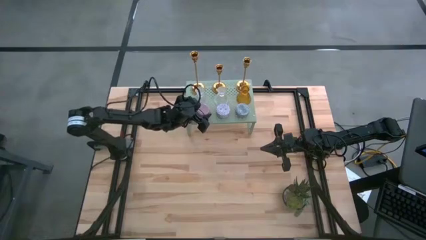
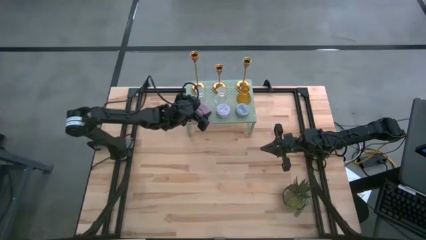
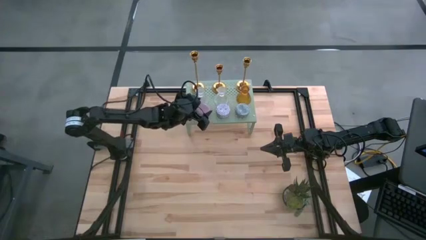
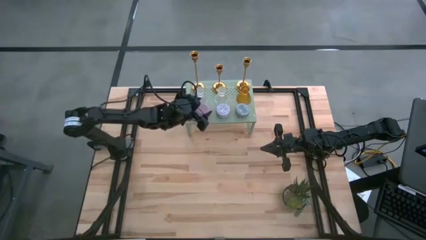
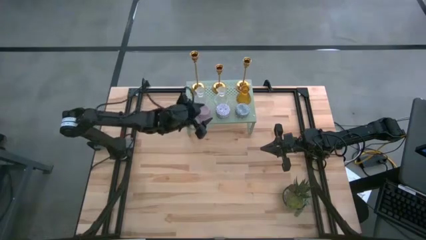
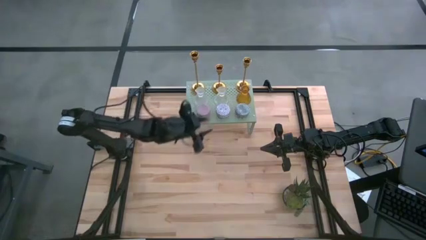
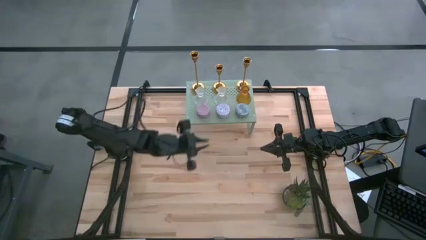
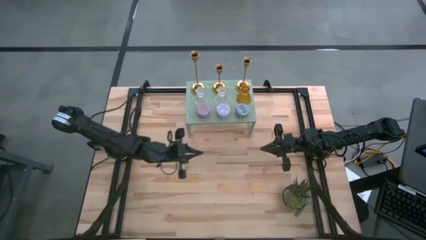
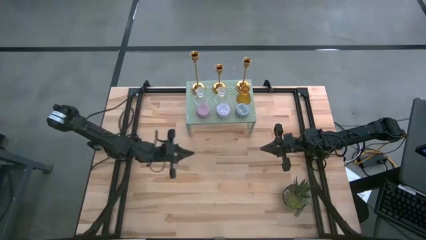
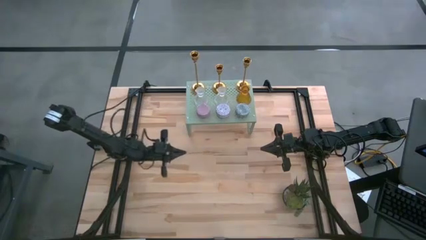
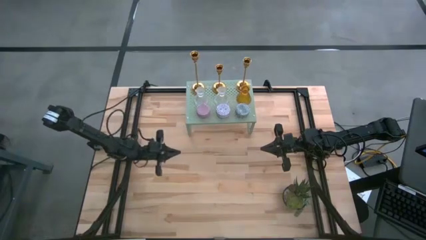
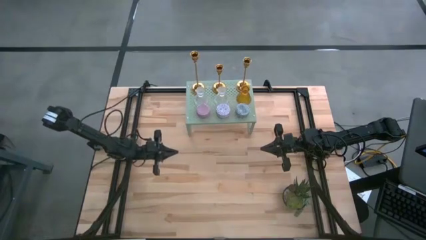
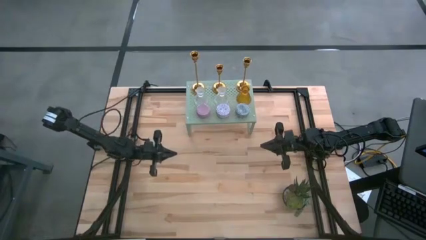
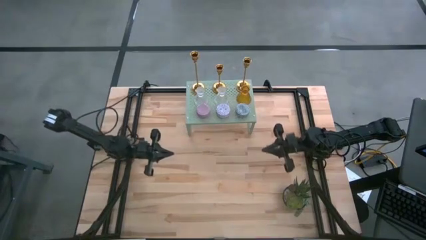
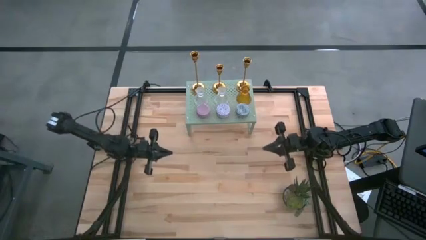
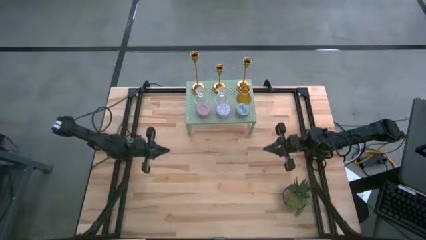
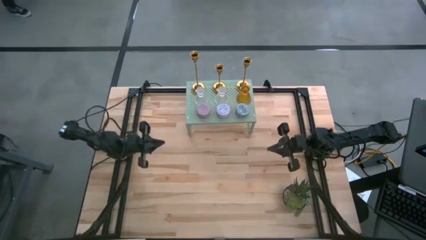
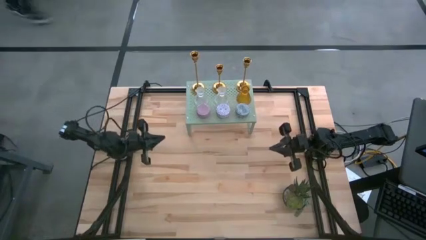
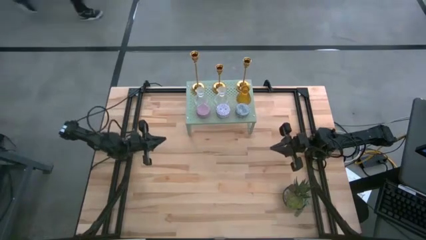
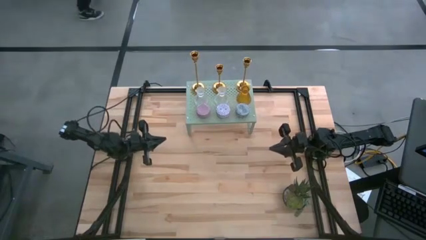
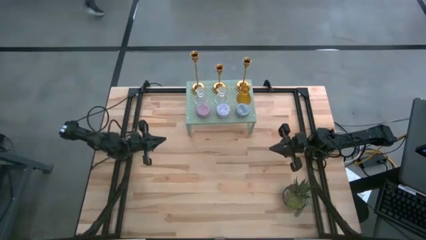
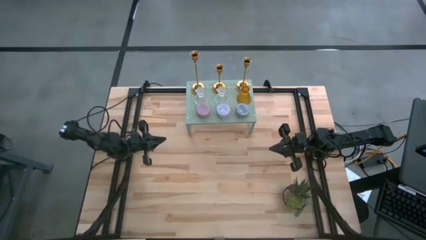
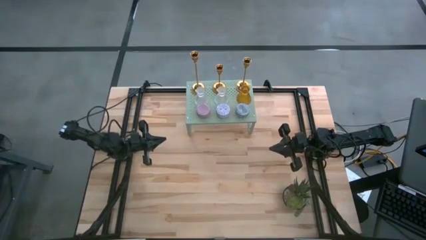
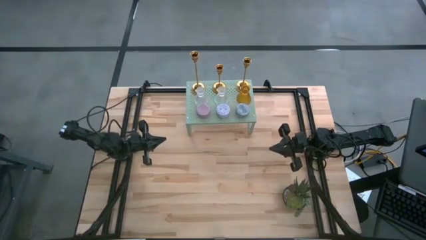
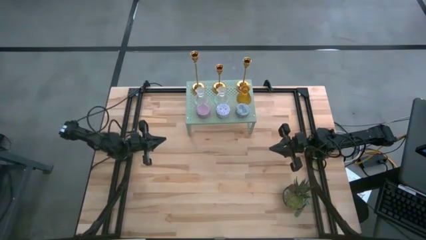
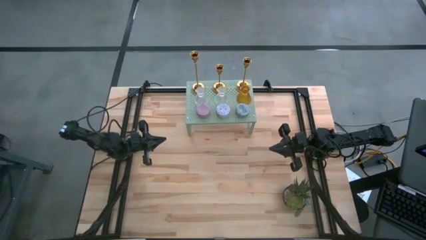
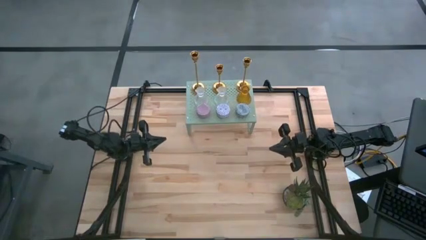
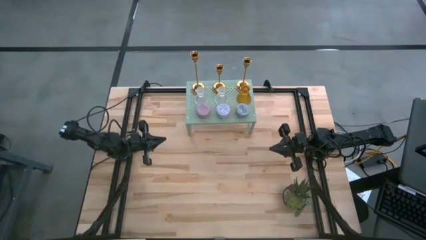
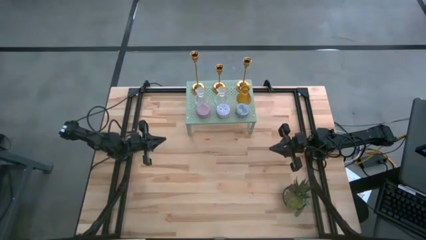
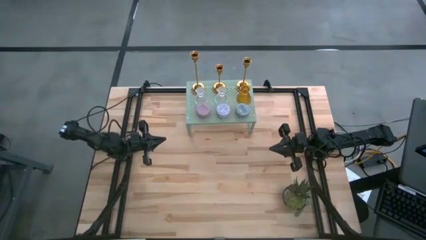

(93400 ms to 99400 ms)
Task: Pick & Place candle stick holders
Return to Home Position

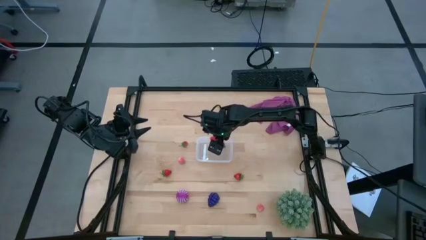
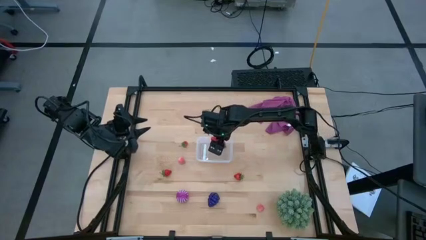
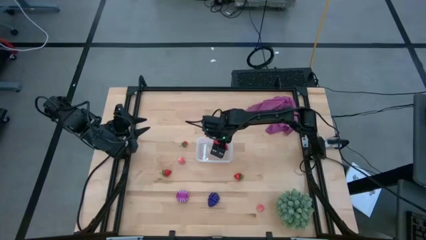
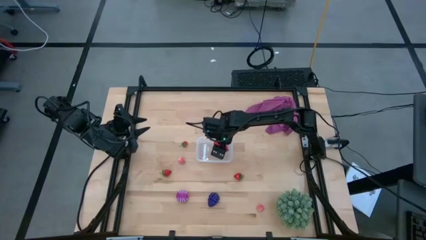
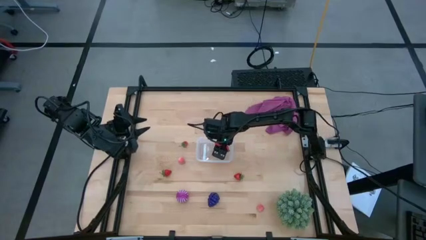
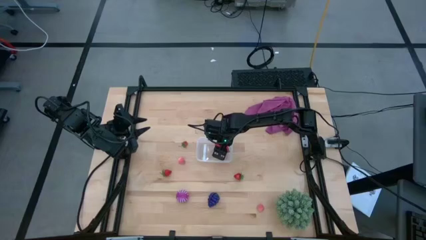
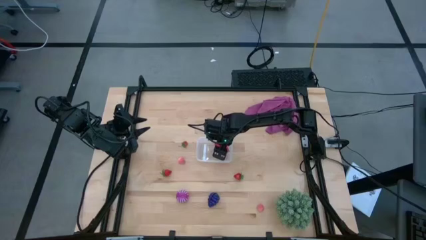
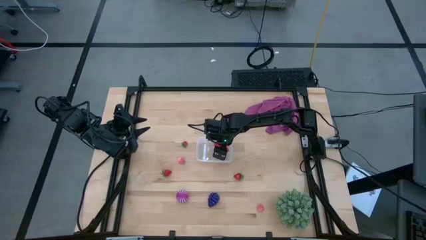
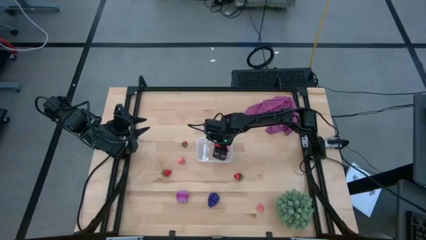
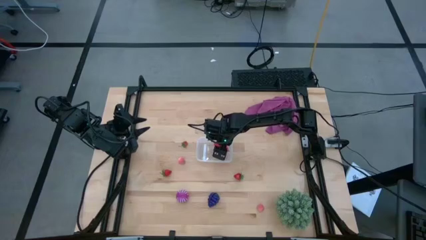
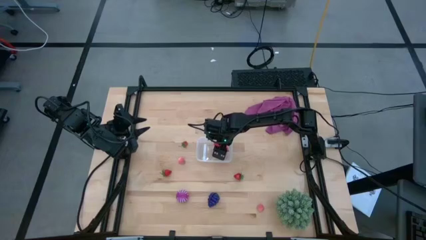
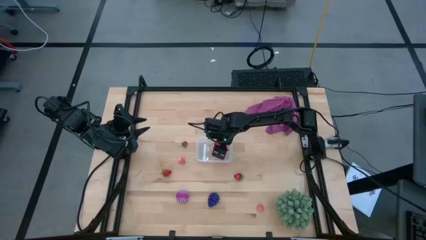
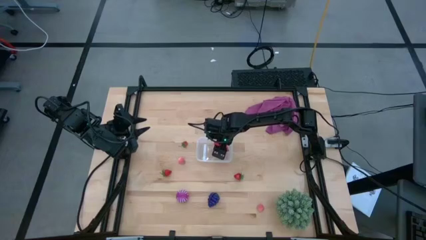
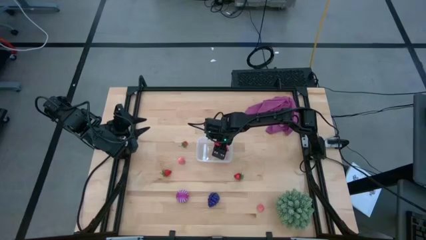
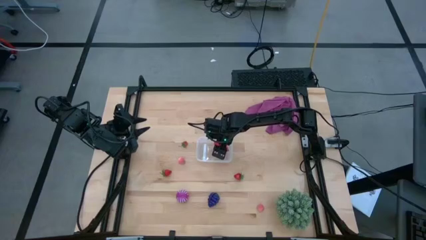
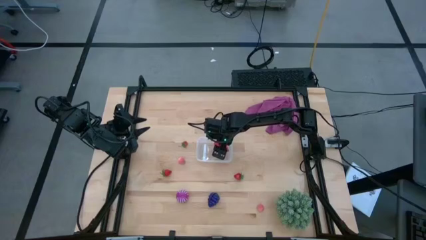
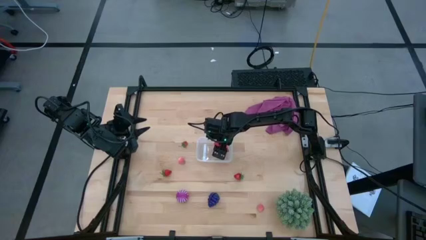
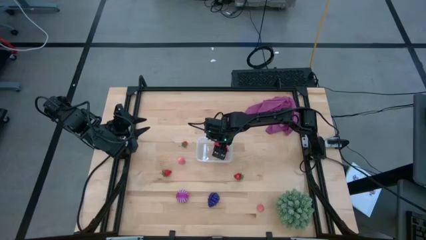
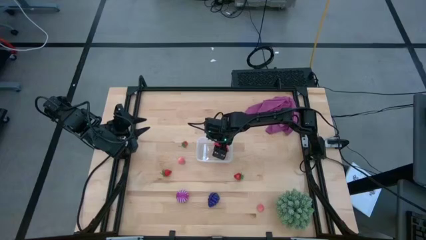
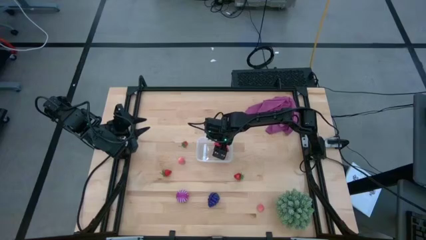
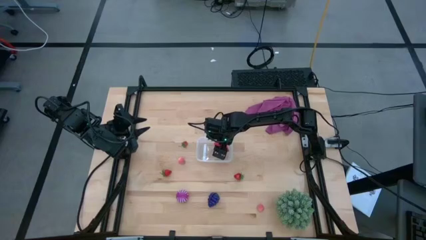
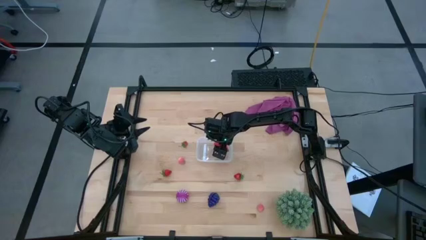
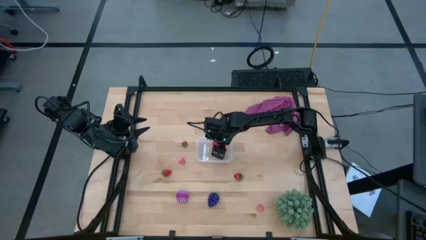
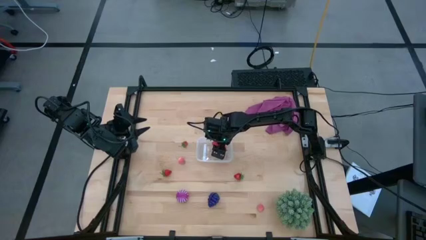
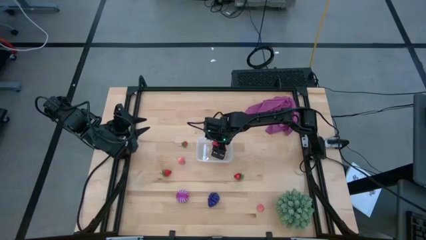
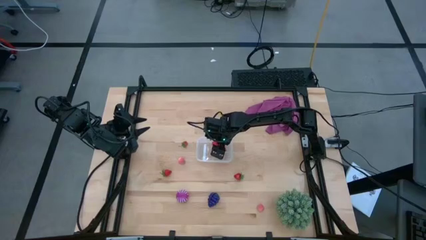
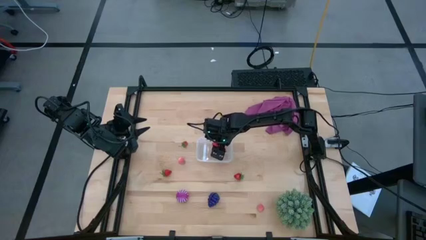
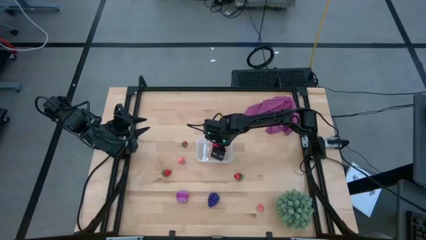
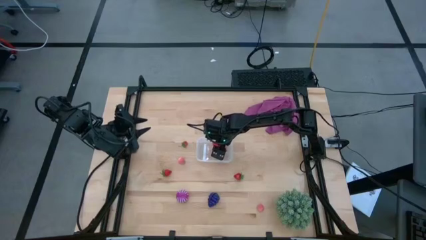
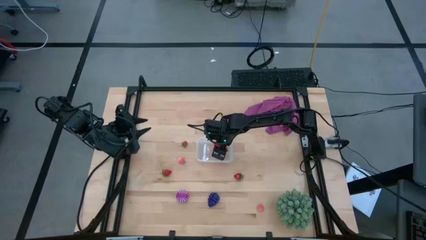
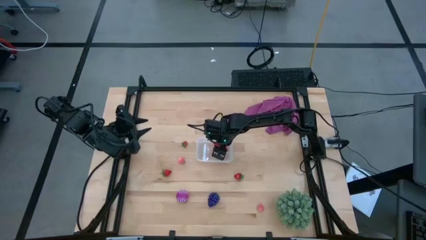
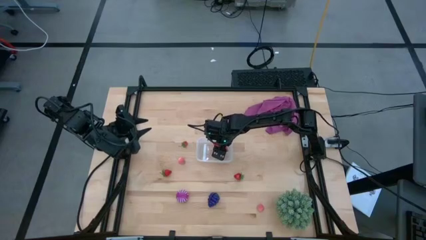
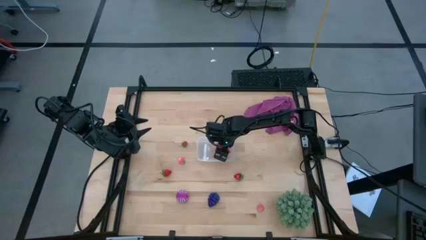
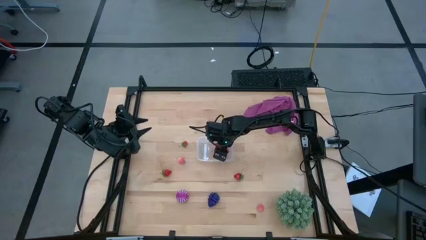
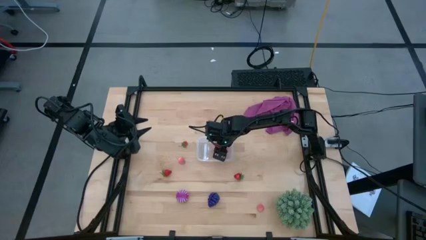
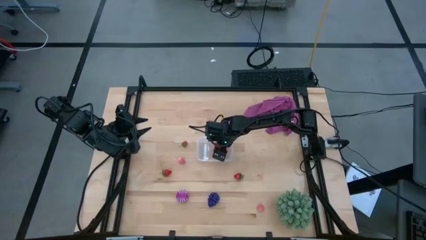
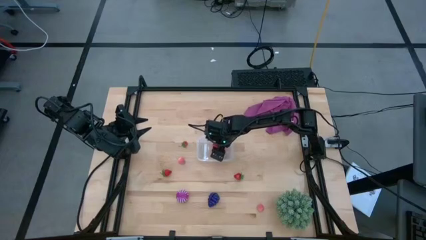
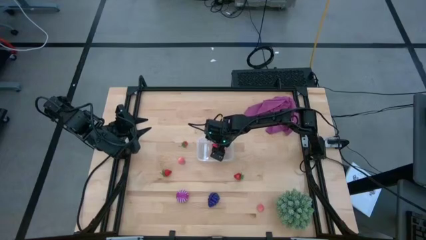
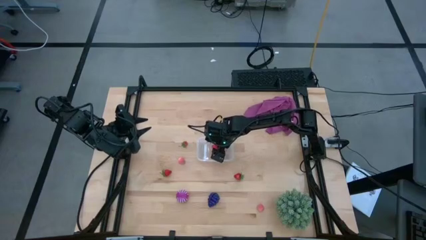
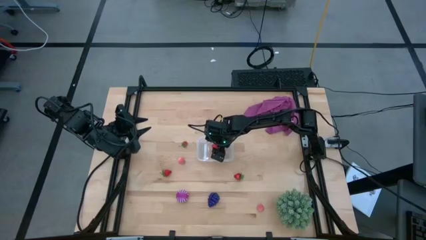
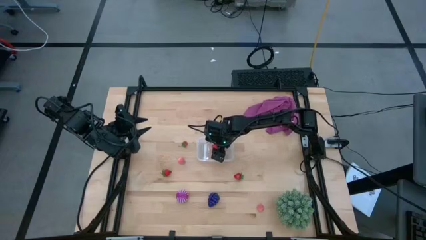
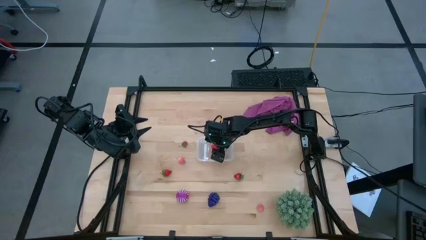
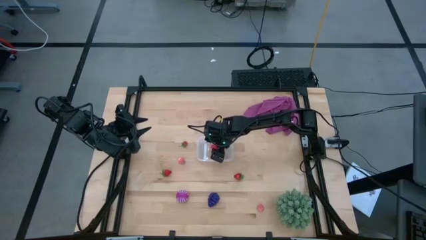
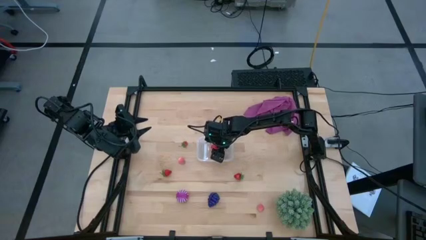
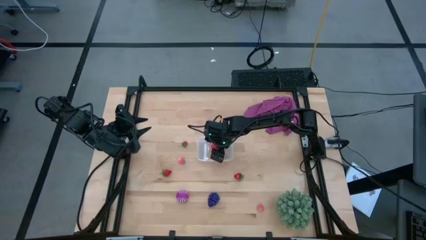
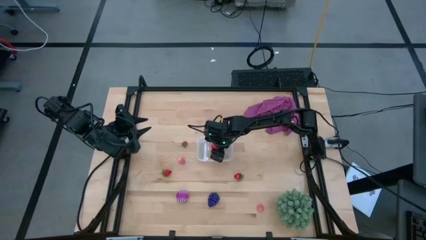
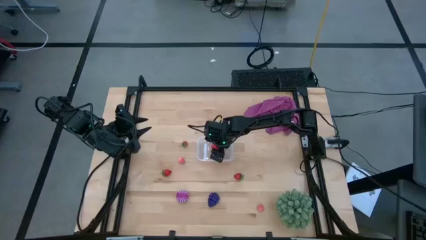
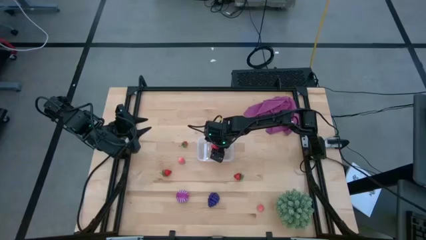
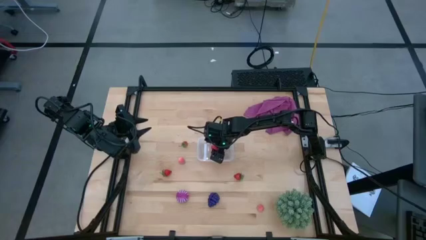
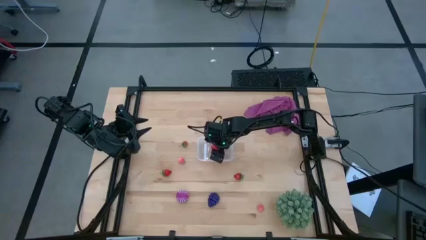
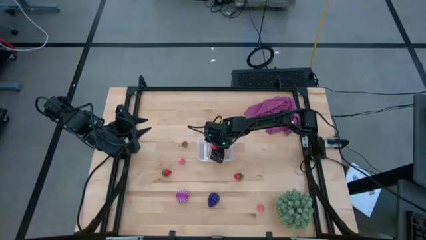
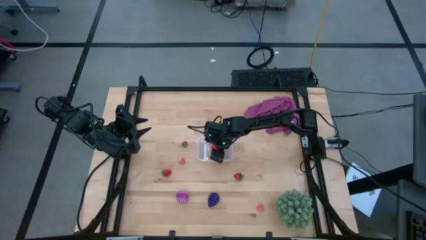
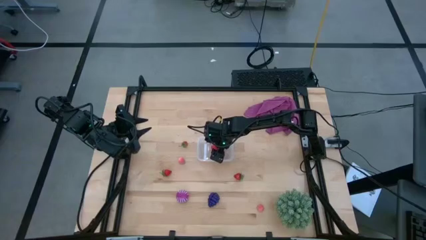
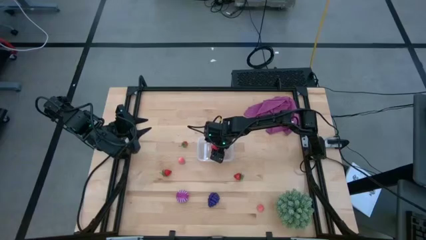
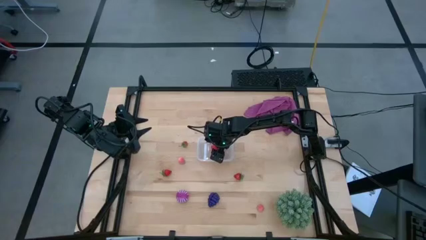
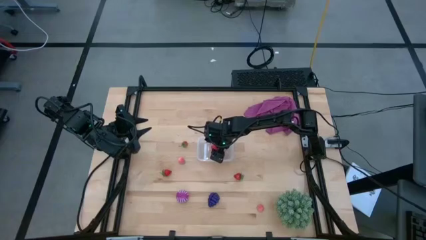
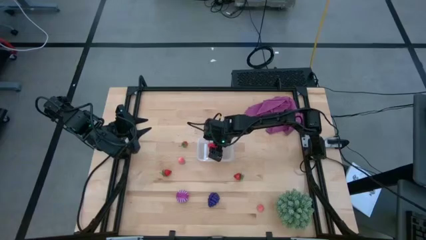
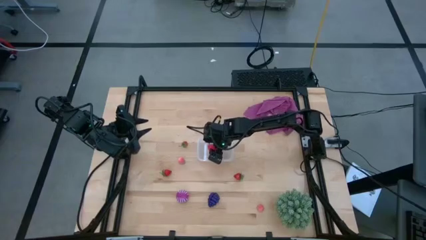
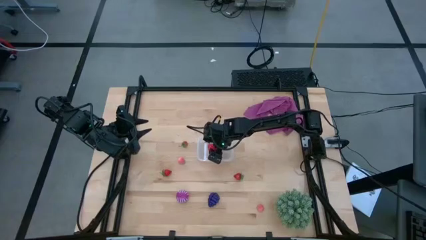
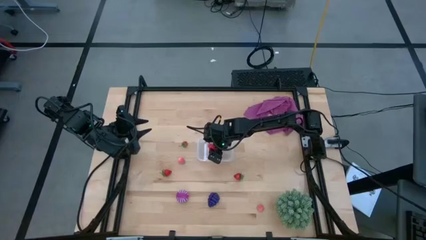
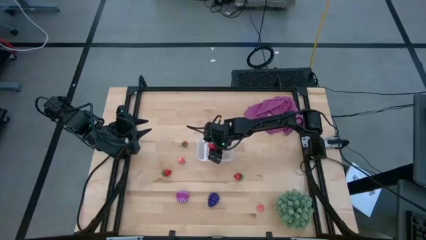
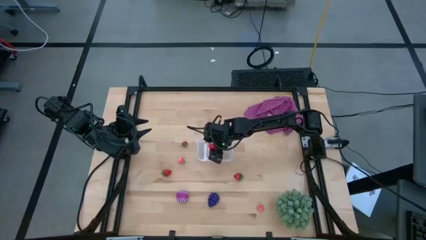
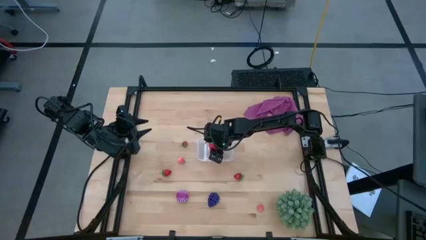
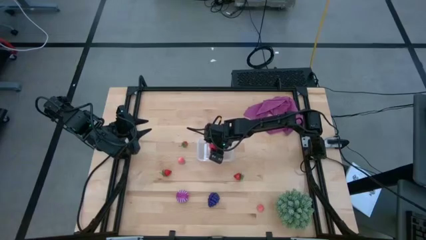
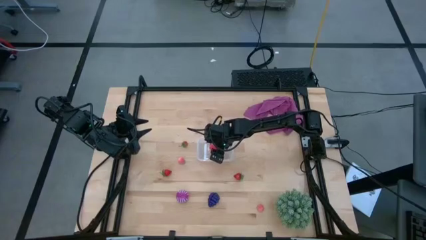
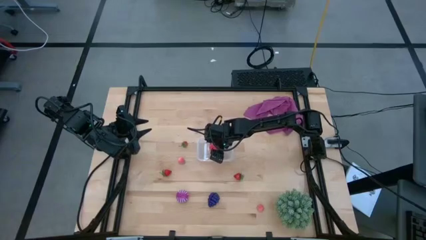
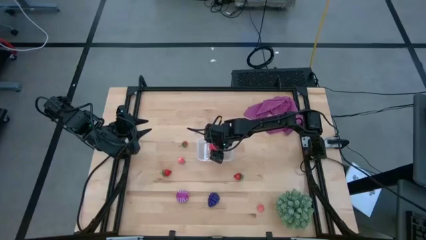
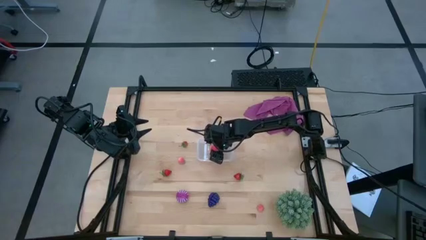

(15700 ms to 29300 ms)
Task: Pick and placing Produce into tupperware
Put the red dragon fruit into the transparent container
